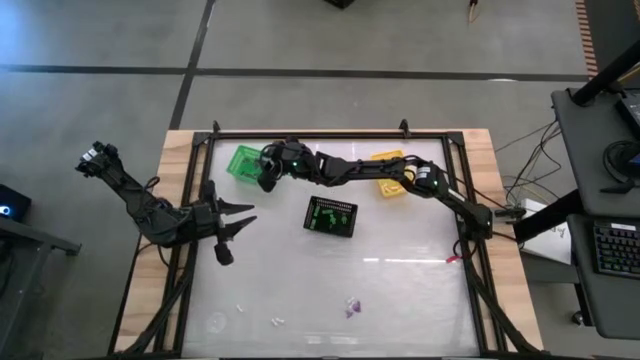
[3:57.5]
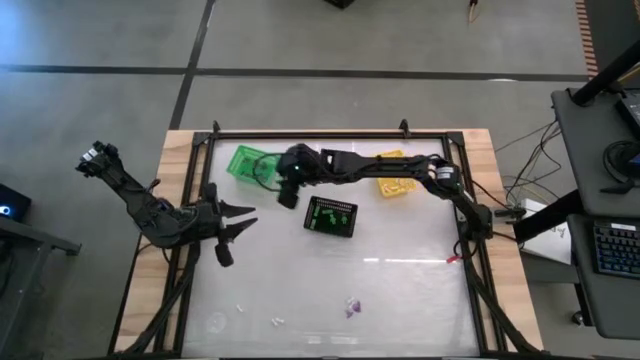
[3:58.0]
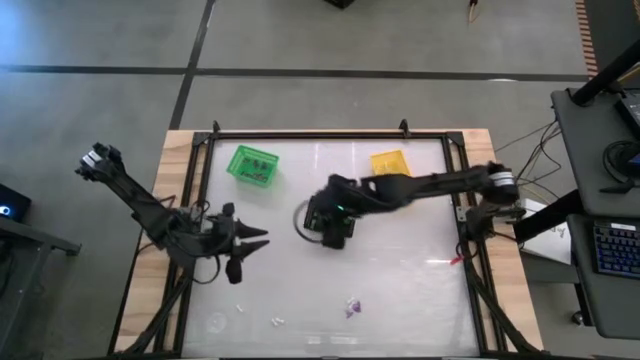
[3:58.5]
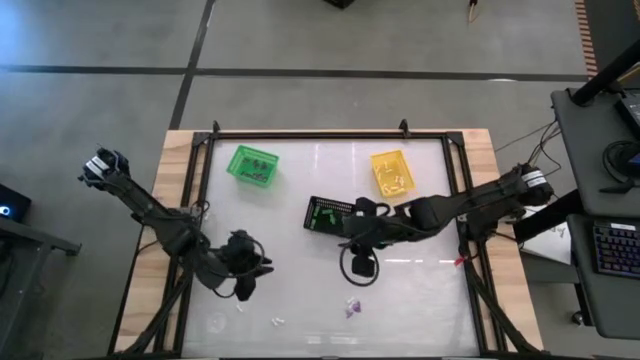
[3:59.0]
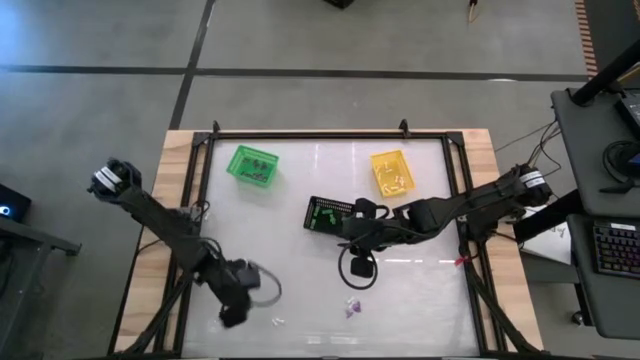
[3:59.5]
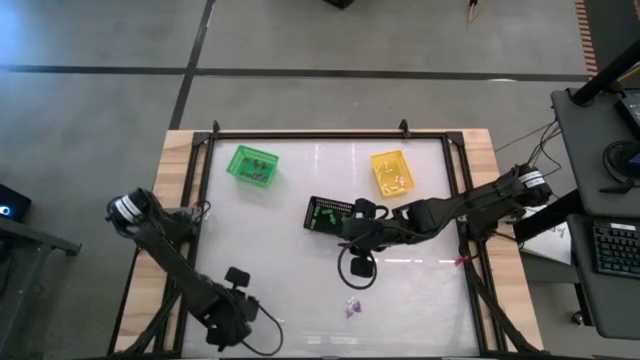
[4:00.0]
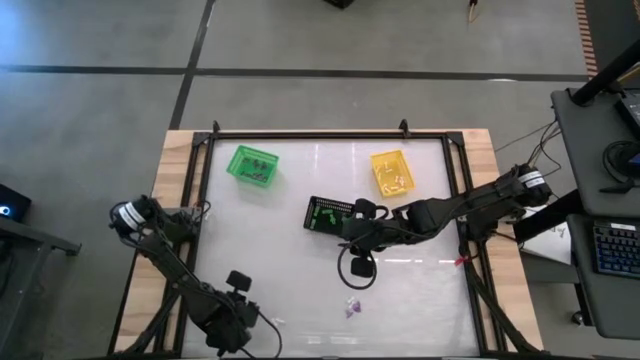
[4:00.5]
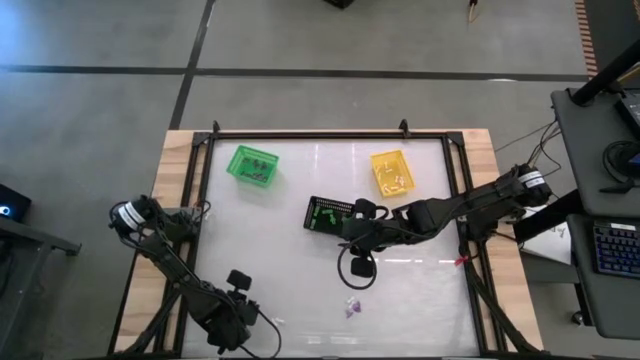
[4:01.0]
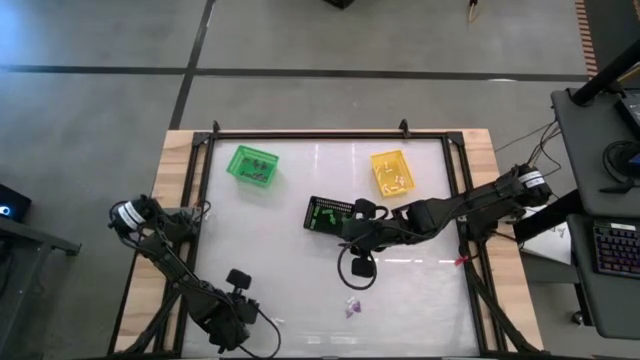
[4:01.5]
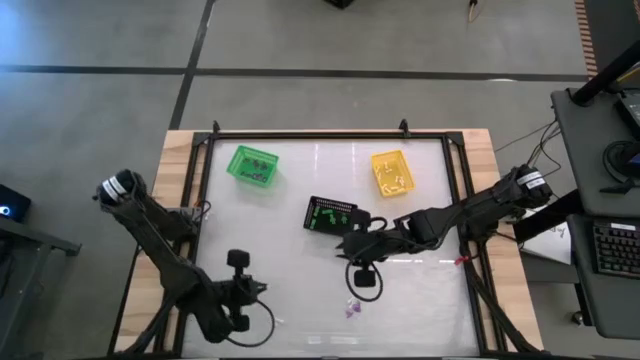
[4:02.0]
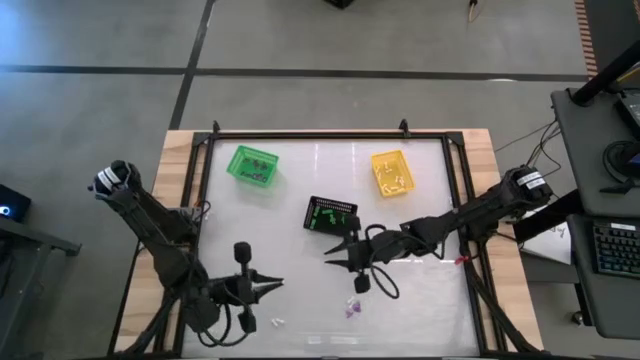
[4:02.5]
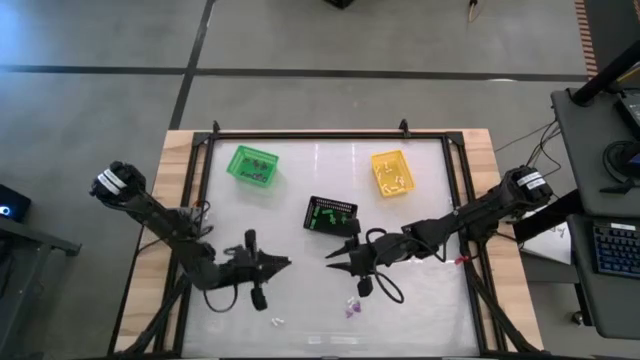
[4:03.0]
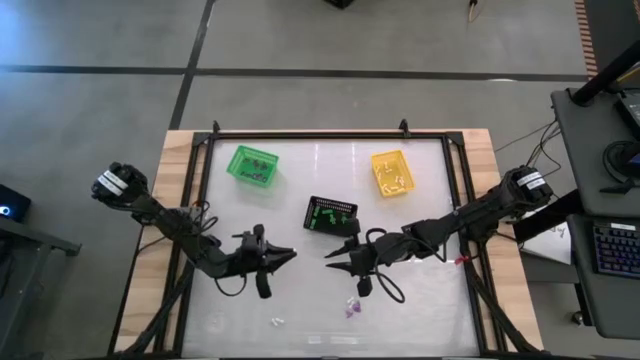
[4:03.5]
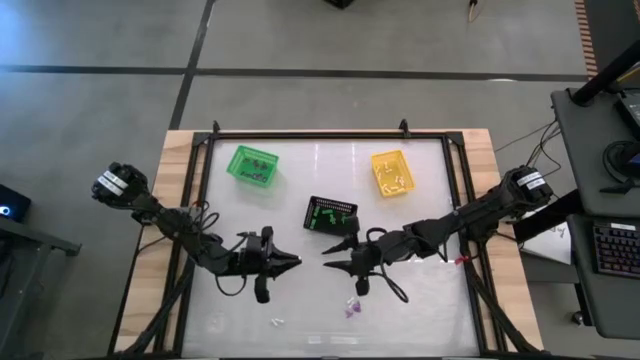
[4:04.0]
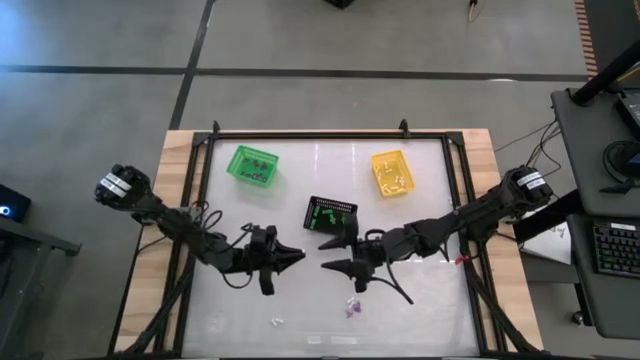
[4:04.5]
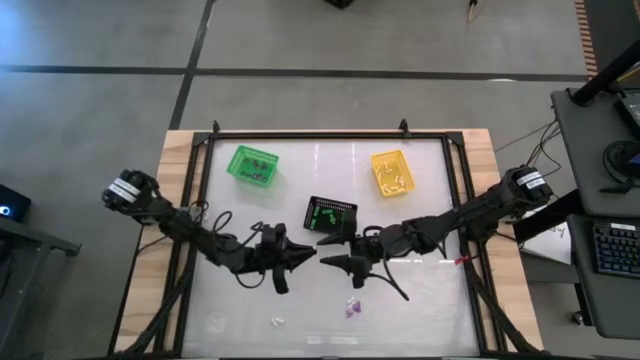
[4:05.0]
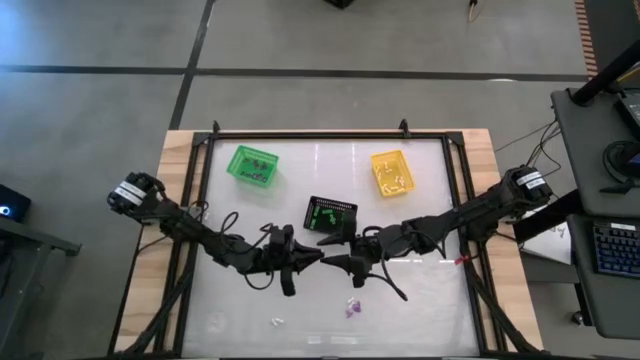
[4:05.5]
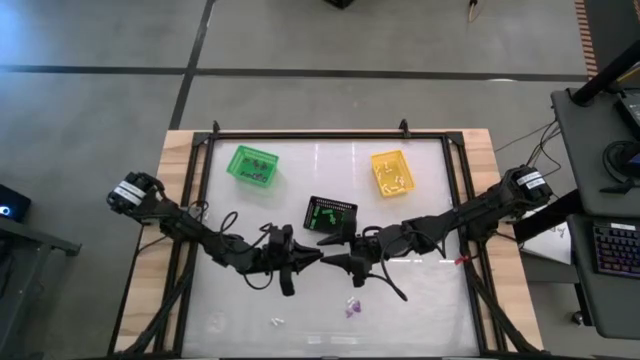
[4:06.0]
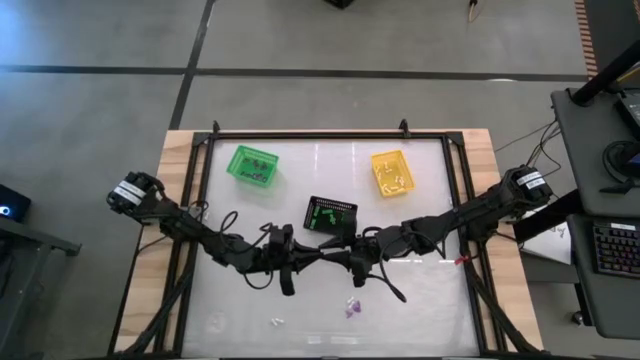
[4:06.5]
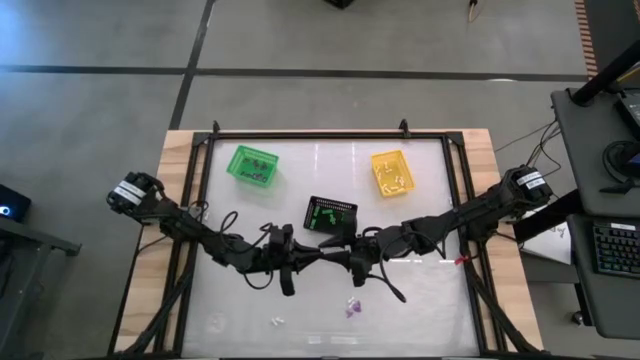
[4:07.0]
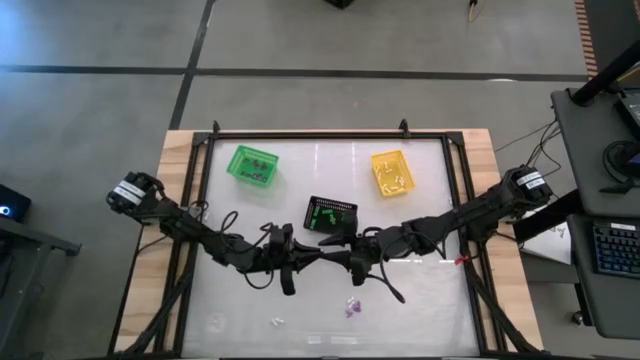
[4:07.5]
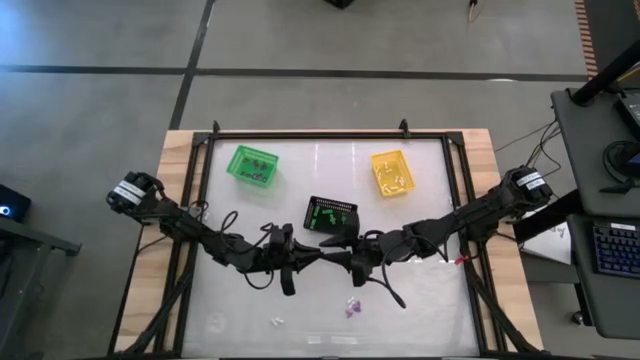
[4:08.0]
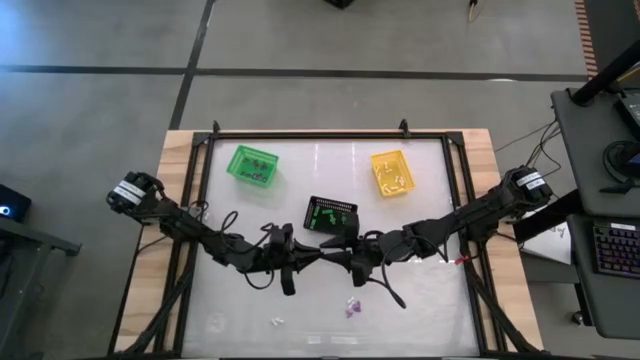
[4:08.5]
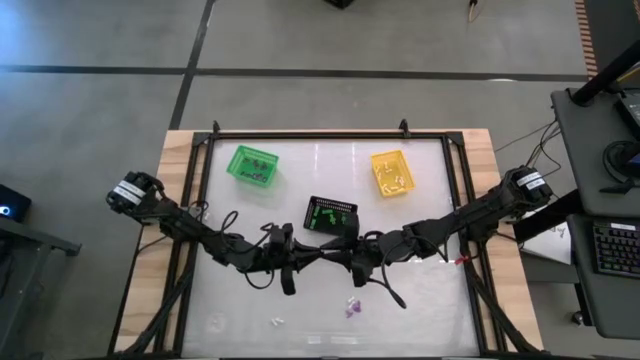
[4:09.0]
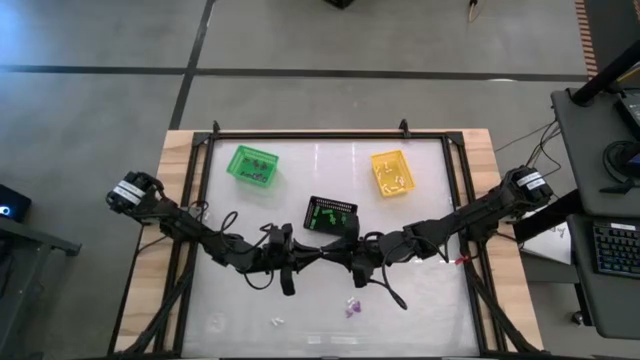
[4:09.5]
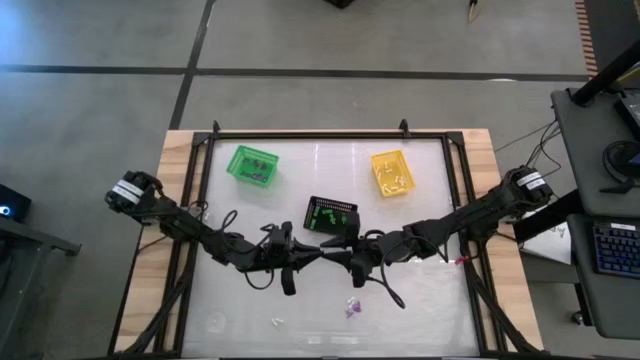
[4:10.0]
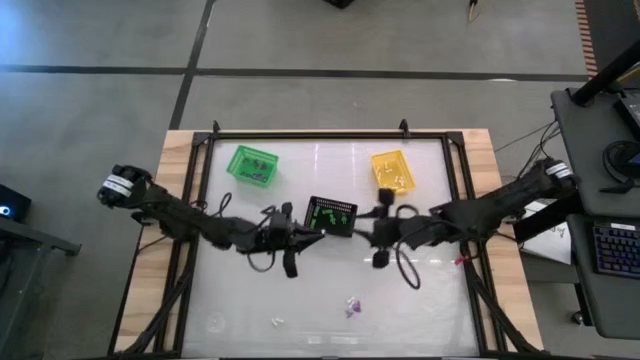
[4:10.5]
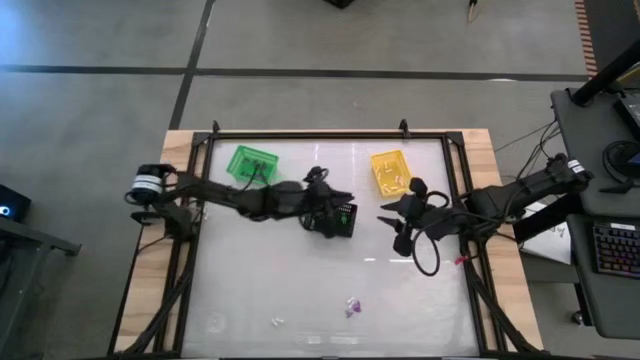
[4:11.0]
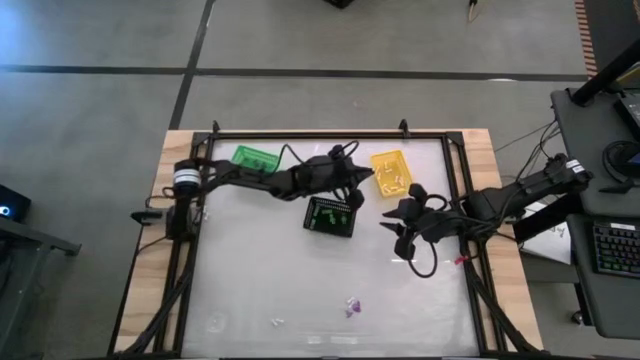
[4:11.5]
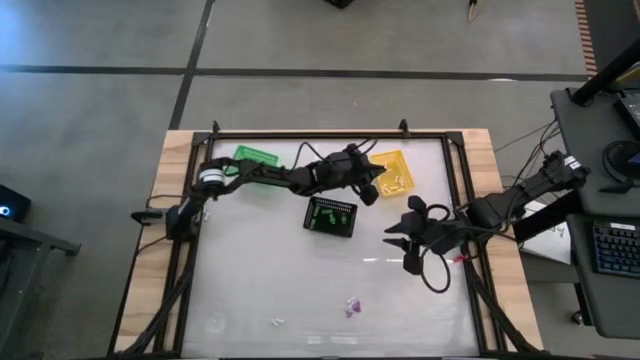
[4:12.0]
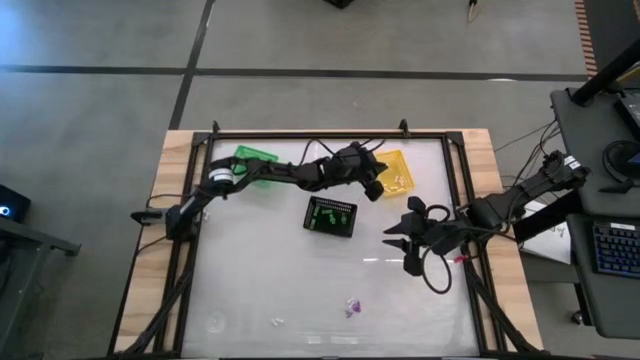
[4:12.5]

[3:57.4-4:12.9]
Task: Sort Halloween decoration
Put the white bone toy into the yellow bin

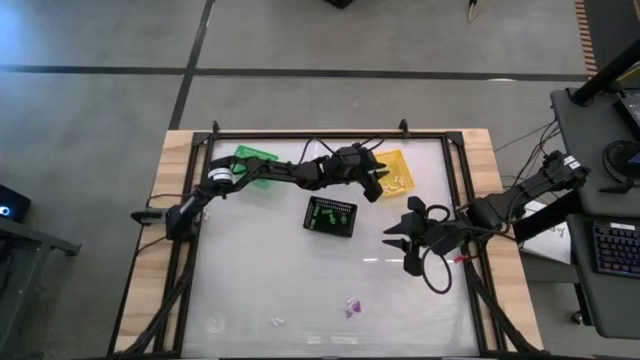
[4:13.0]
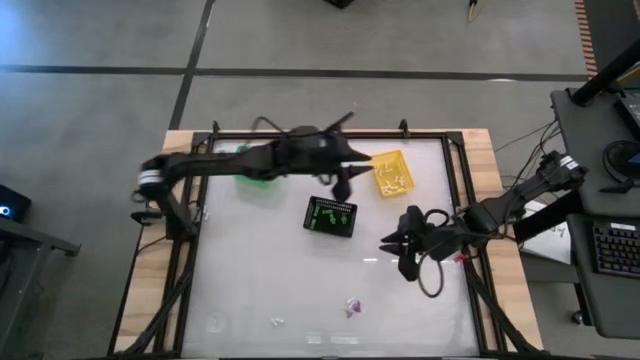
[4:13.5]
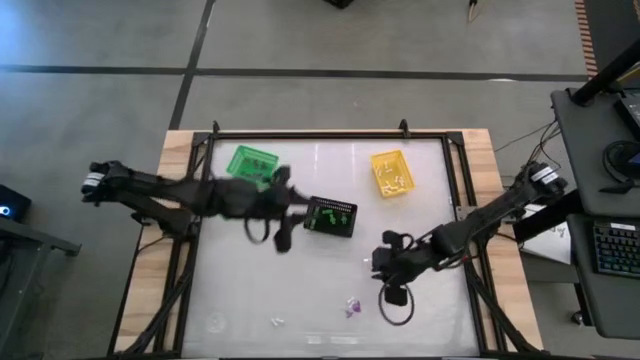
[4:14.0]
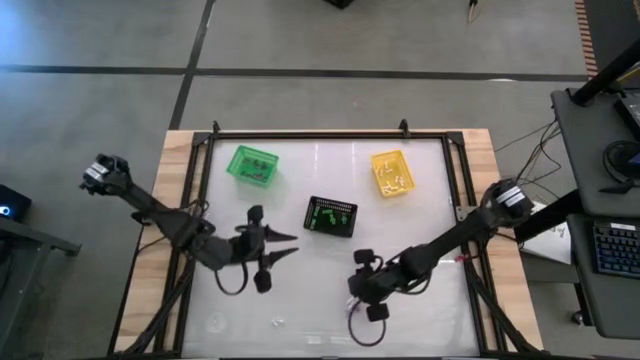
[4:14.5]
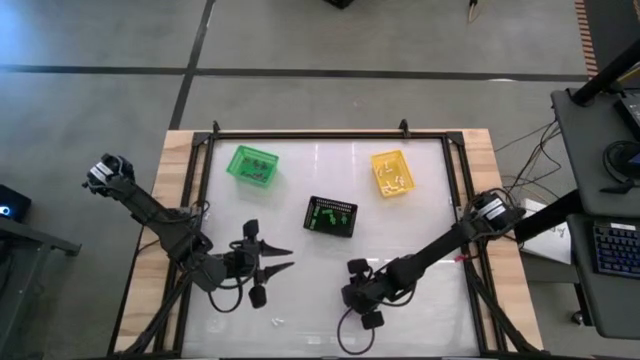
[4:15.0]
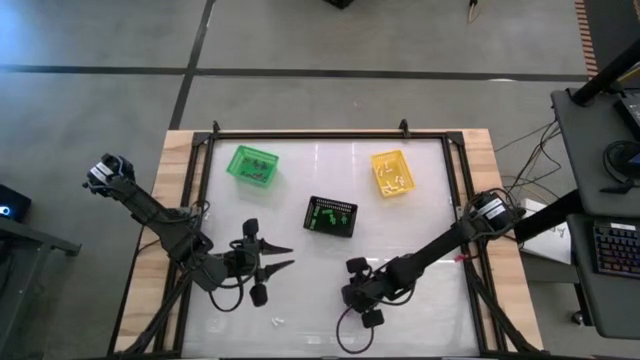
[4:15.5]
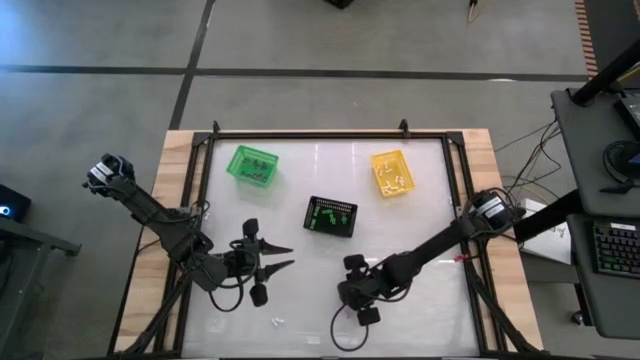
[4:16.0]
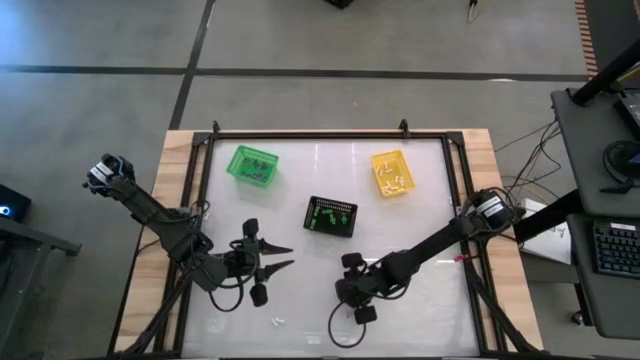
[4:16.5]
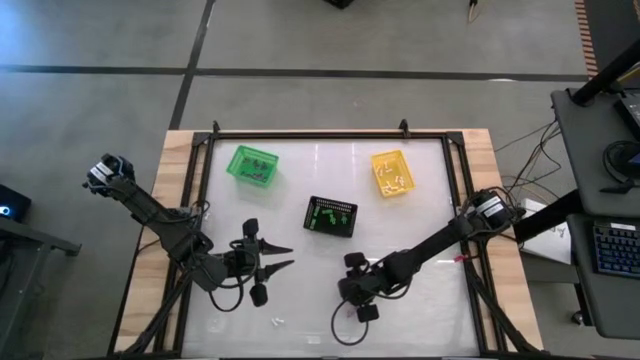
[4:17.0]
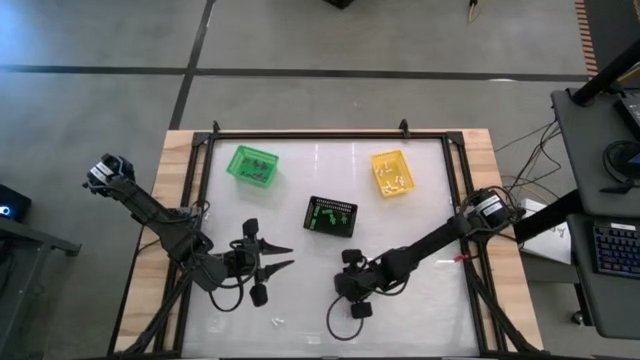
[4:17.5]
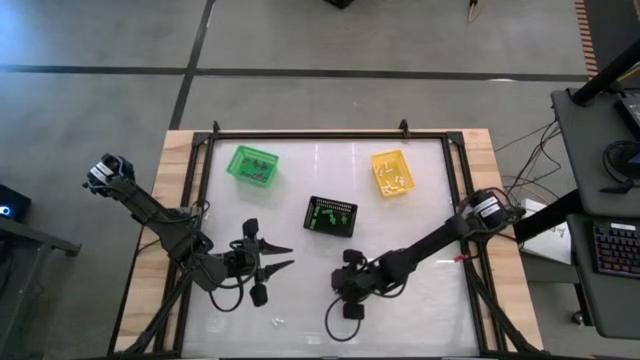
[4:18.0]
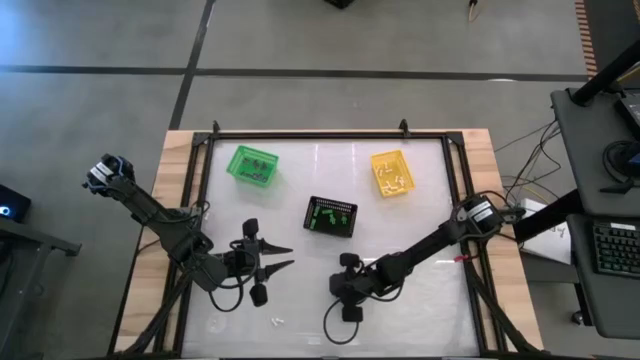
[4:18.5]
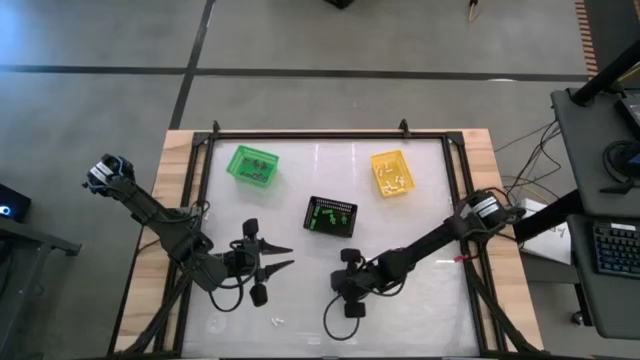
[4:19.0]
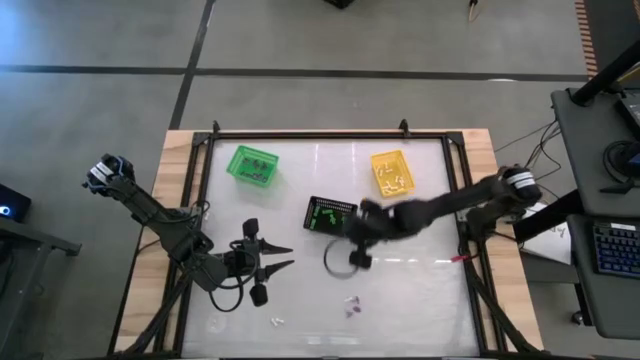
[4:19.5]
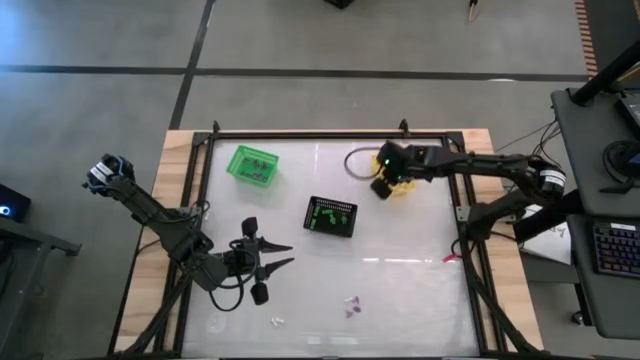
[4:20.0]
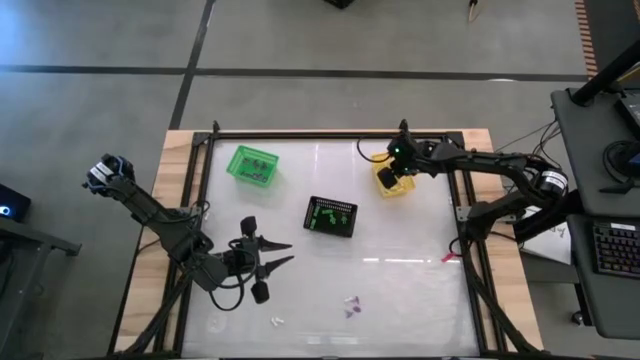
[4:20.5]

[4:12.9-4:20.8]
Put the white bone toy into the yellow bin
